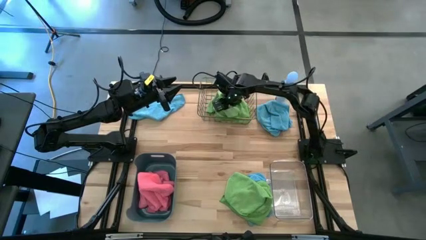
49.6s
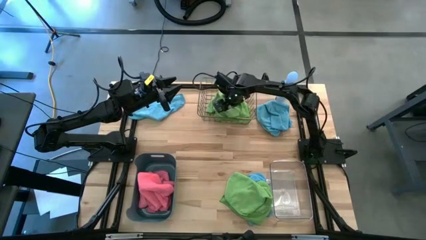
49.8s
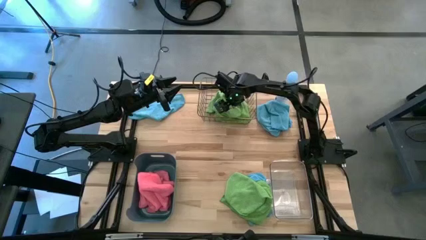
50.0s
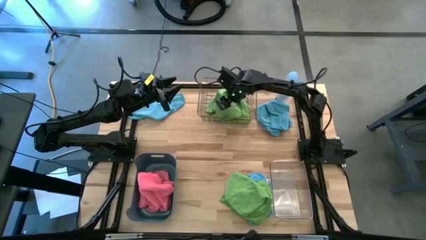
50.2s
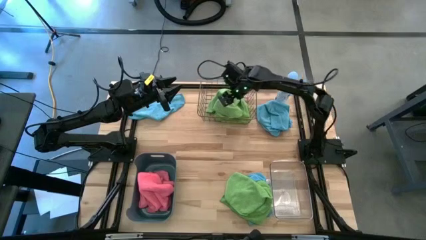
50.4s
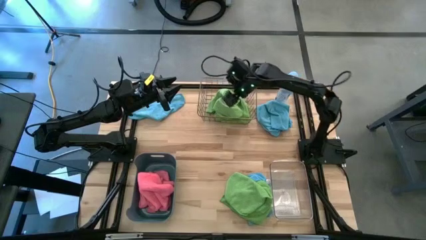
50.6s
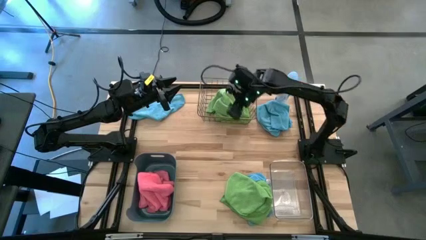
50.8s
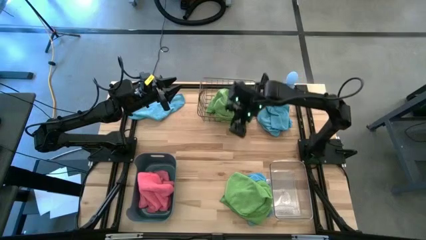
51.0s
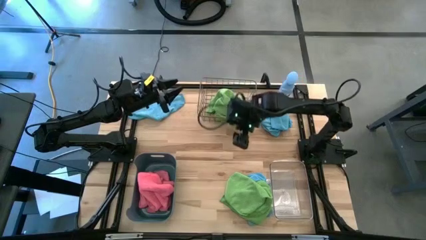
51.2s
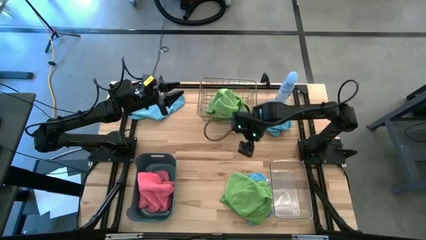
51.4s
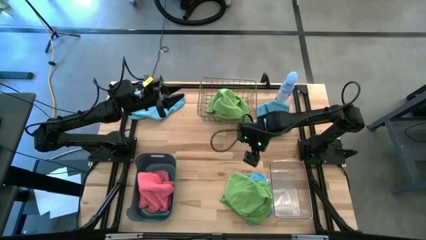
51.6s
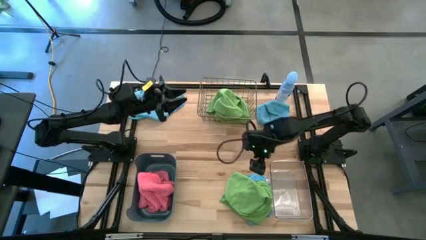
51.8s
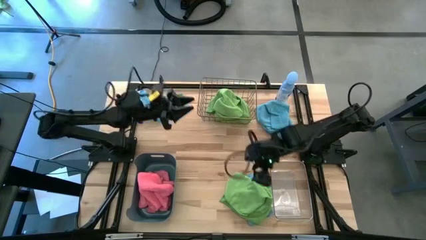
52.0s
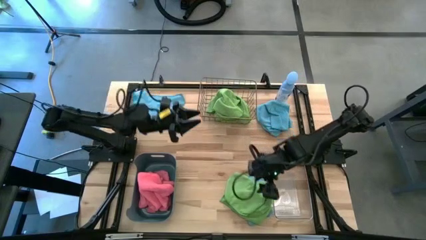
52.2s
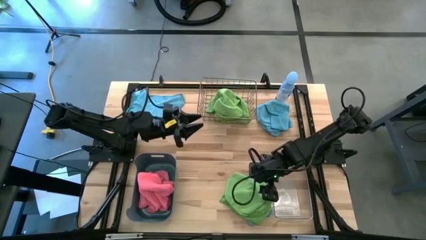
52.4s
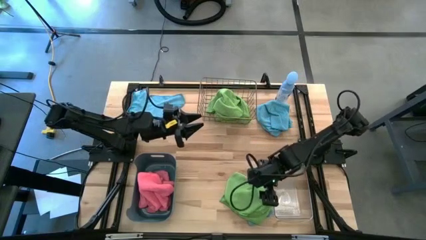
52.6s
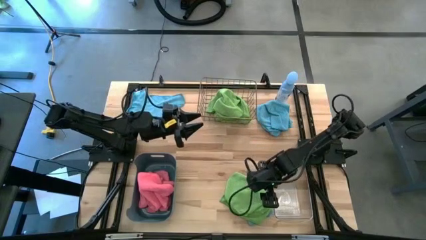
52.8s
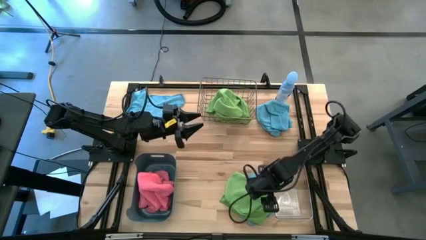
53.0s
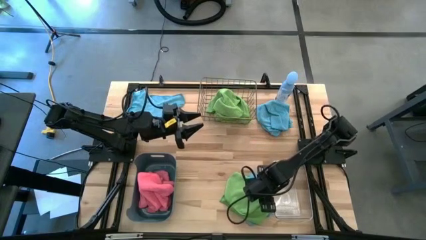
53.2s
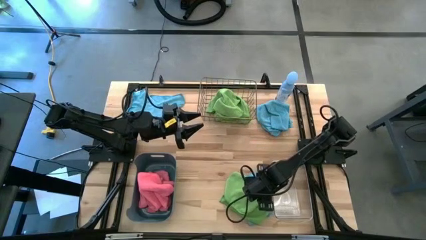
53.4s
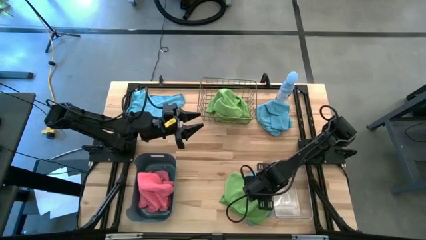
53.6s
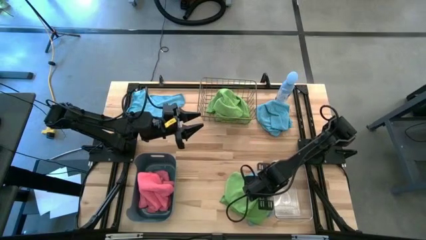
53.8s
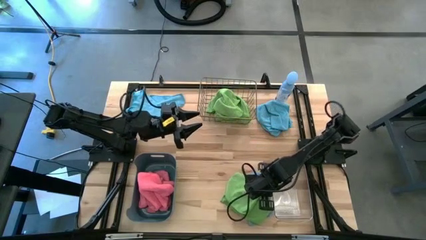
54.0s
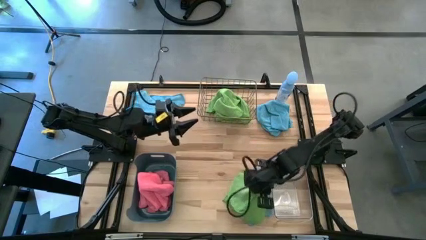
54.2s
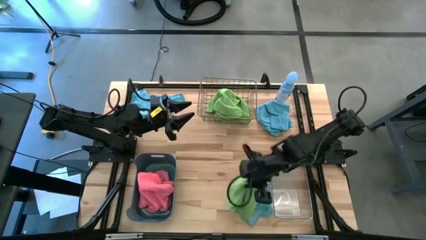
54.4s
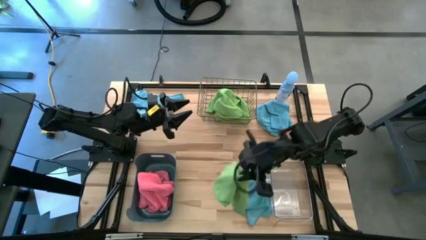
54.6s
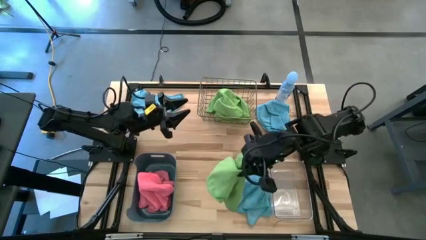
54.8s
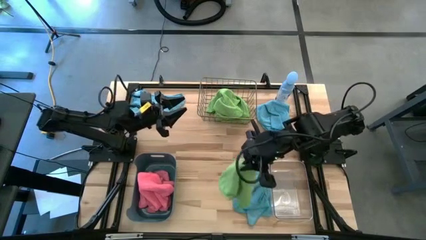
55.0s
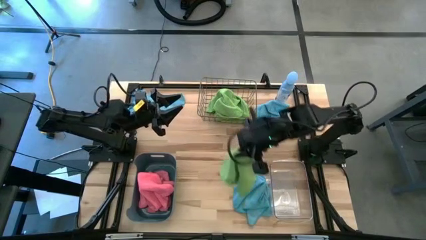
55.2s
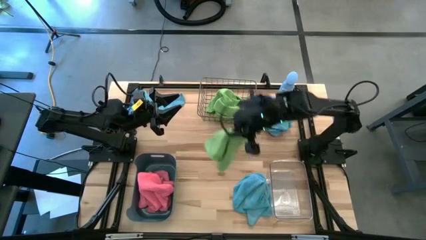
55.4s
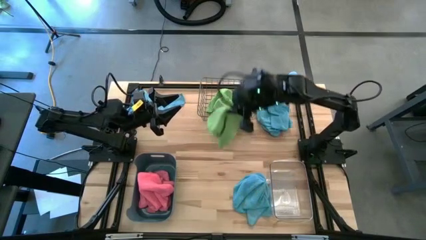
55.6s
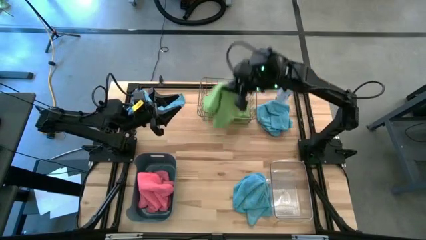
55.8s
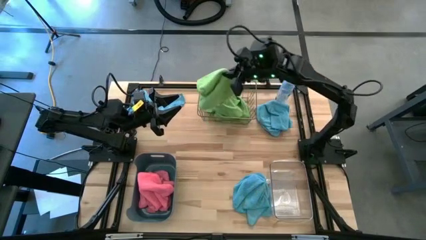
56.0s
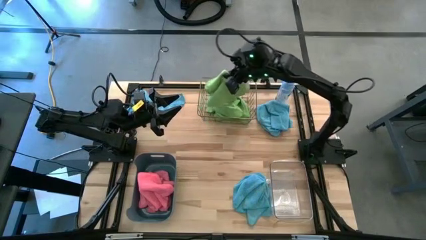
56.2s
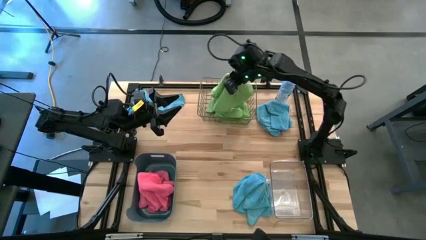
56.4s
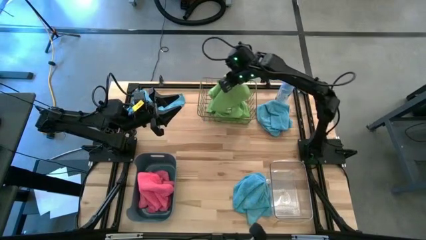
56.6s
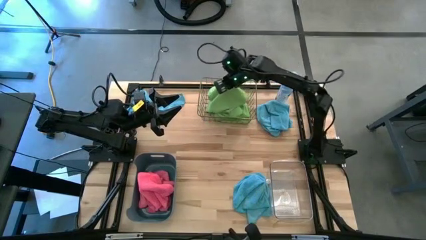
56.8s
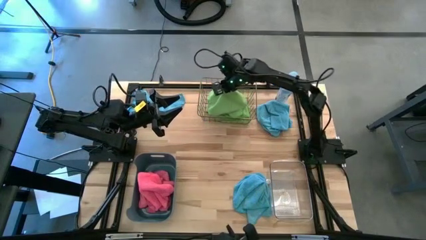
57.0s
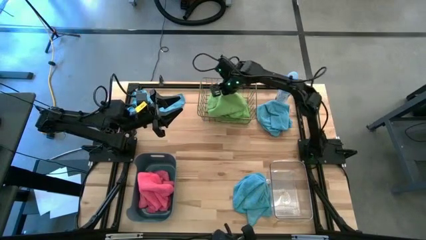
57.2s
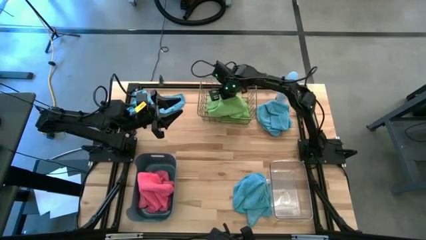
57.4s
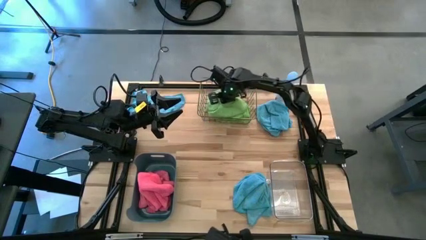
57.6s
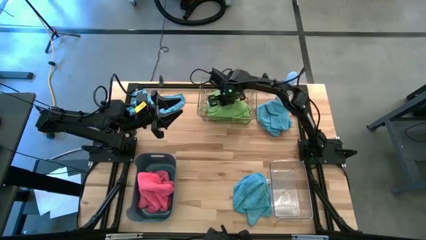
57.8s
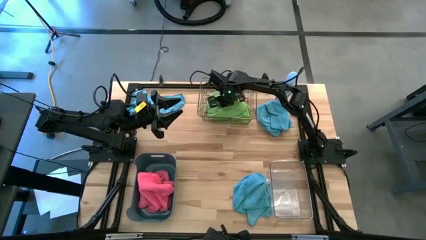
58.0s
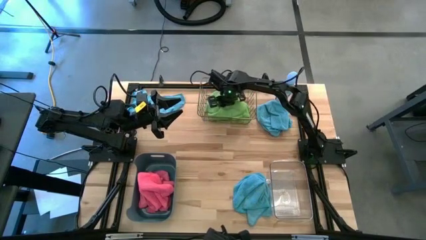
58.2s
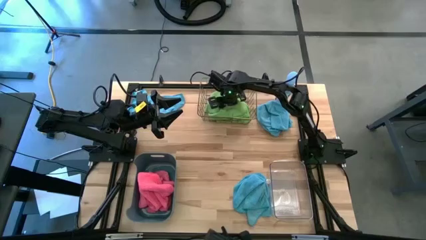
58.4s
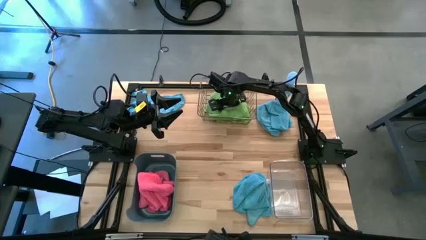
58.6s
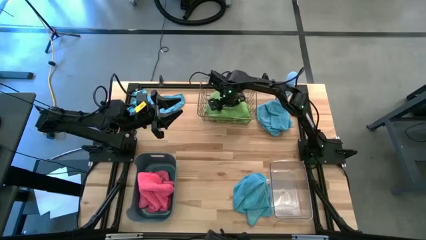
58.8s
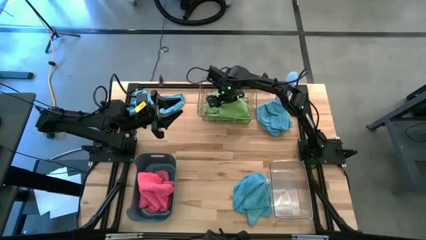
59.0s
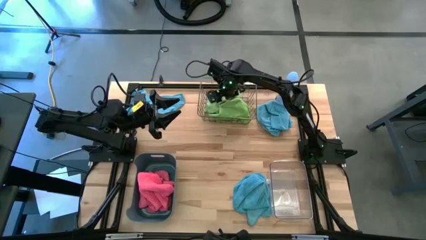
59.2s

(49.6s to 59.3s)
Task: Sort microfiber towel by color & place in baskets
Put the green towel into the wire basket

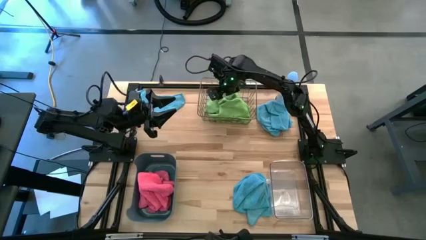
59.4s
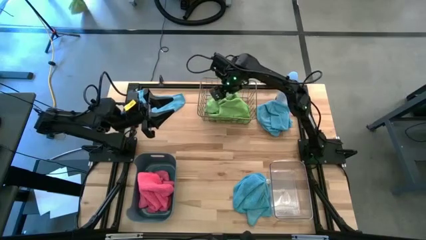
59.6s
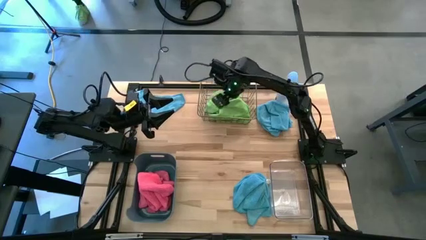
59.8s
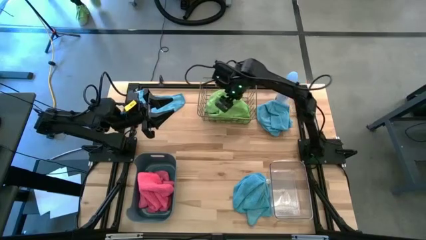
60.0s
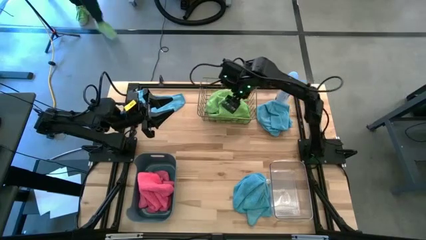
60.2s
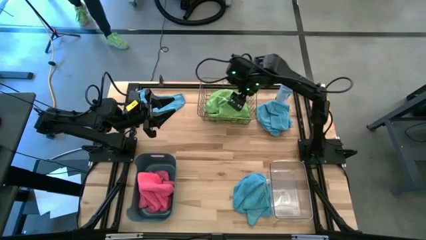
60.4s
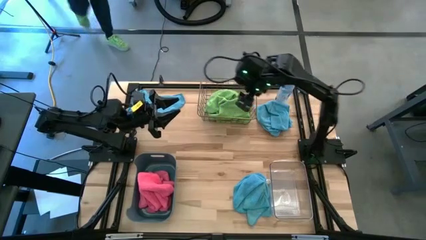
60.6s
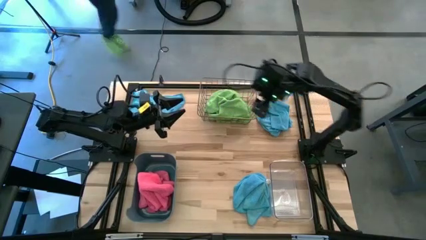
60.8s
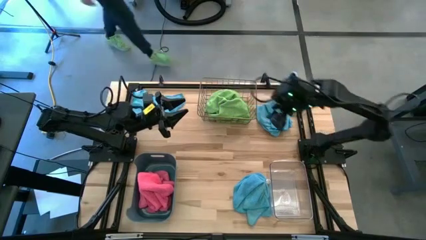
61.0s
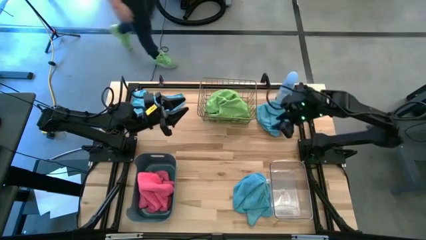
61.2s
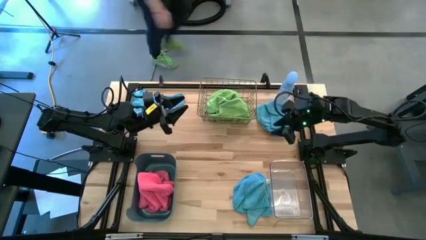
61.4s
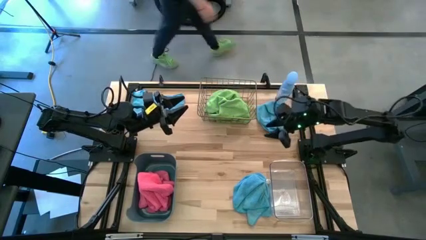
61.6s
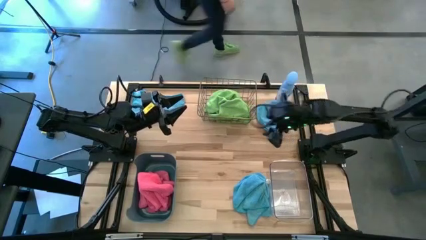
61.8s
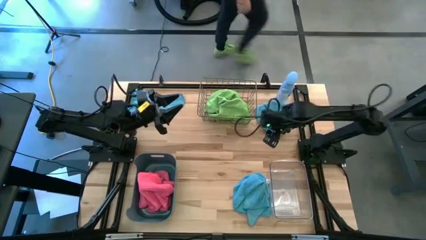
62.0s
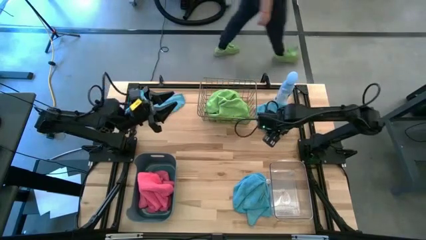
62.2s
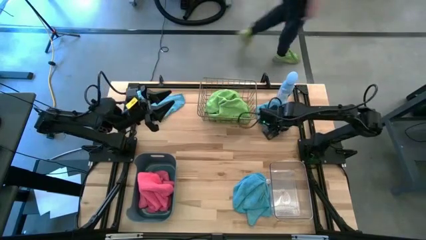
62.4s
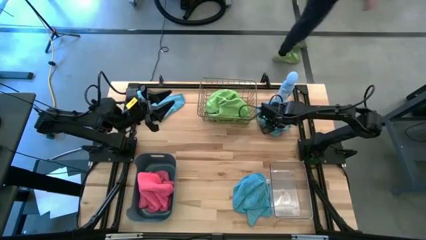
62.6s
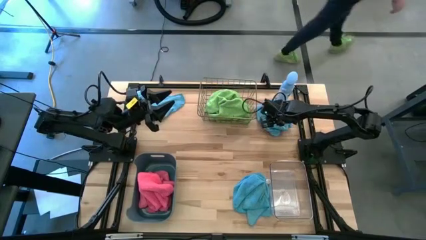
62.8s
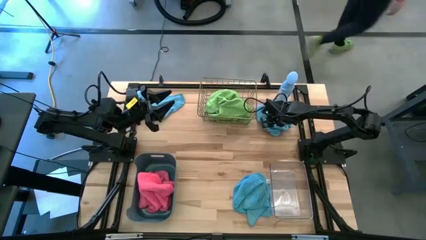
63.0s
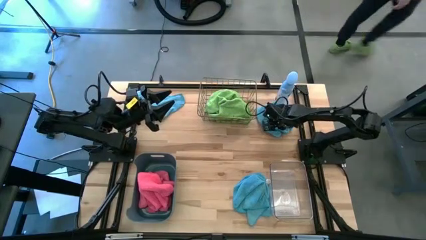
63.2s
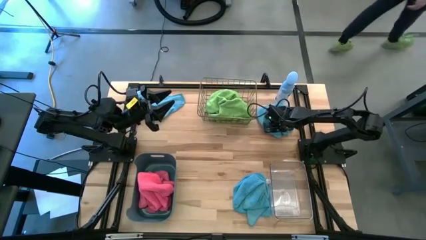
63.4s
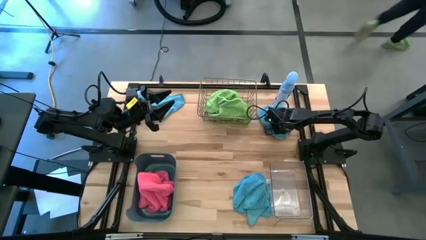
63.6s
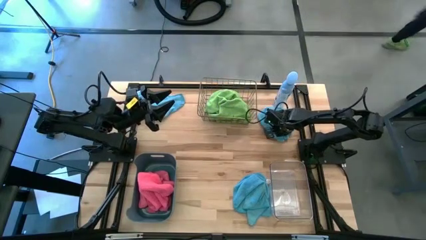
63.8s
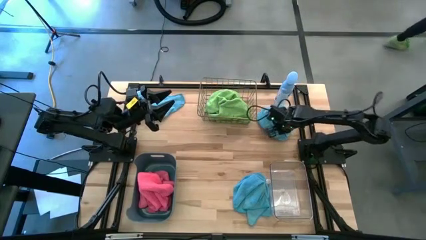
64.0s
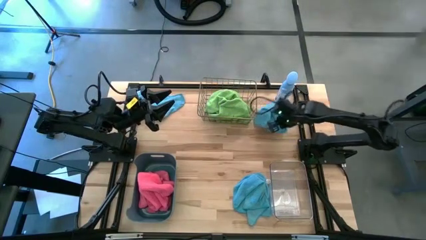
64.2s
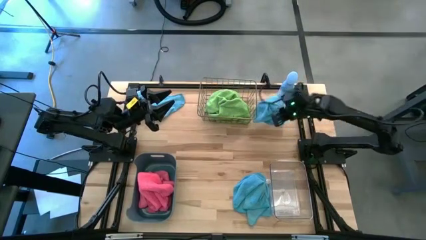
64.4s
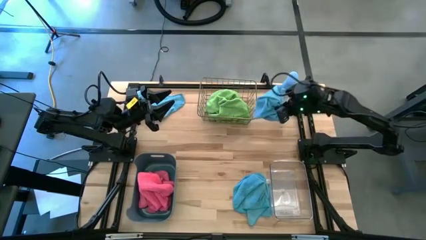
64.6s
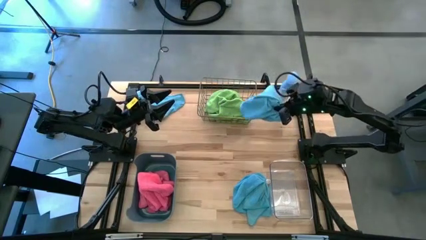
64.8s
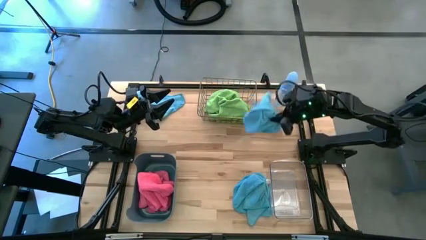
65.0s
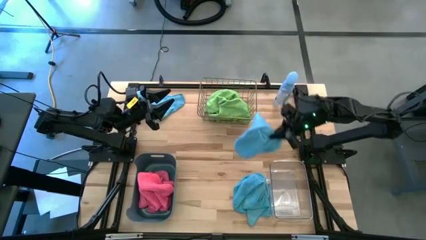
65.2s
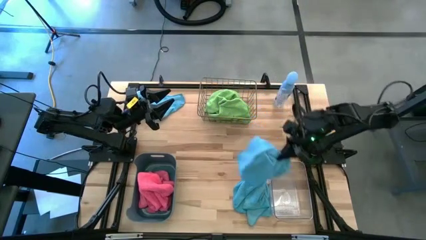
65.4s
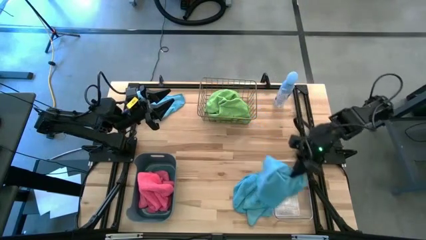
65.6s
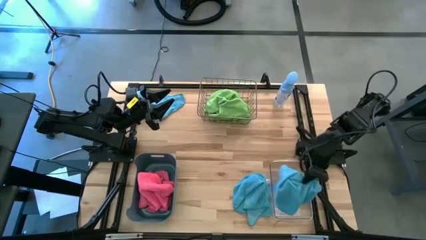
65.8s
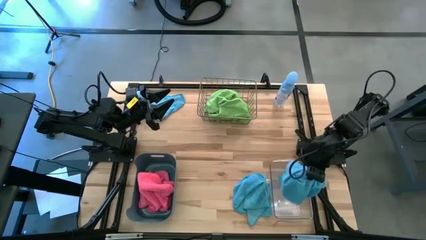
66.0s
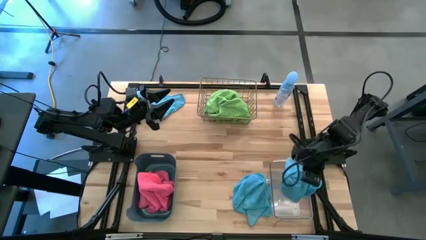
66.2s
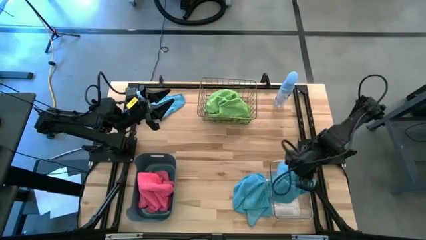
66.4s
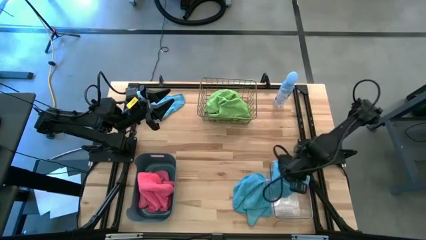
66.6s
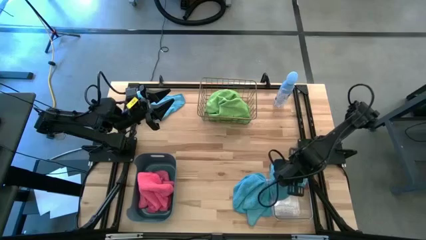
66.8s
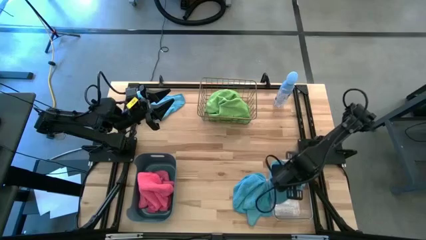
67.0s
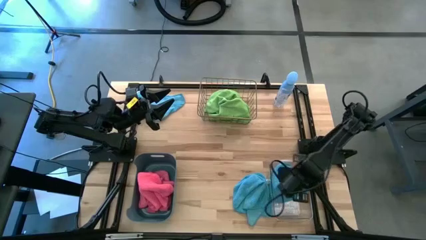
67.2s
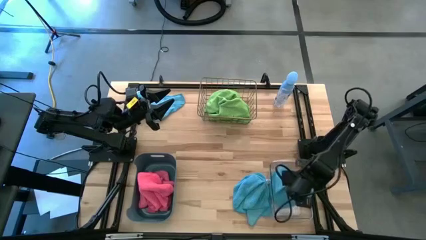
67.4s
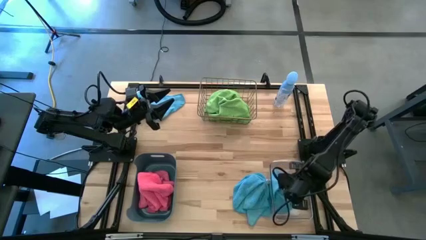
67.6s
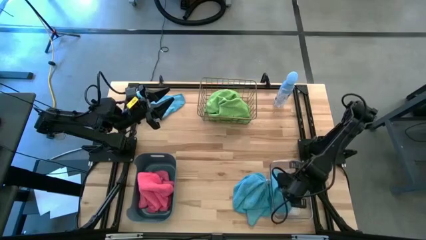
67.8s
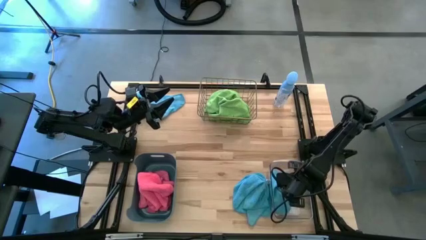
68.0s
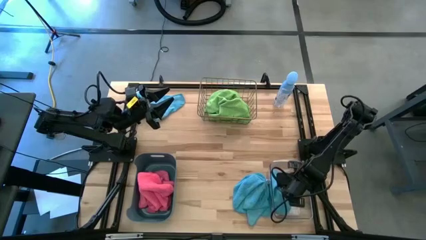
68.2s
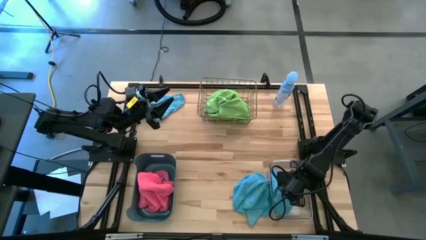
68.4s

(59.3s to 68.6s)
Put the top right blue towel into the transparent bin
